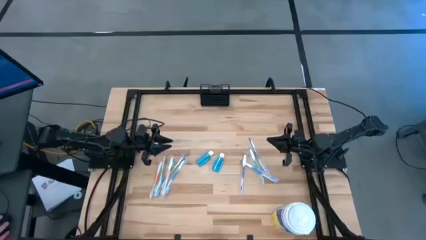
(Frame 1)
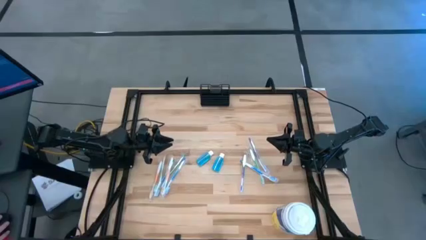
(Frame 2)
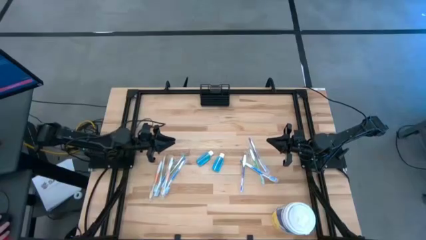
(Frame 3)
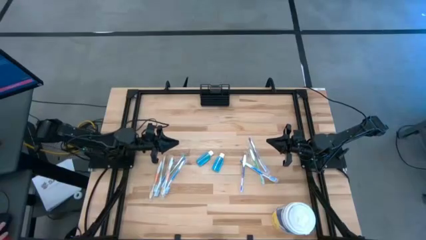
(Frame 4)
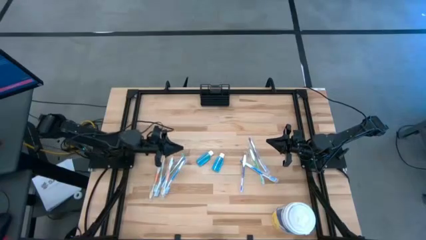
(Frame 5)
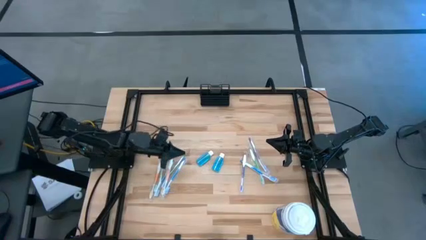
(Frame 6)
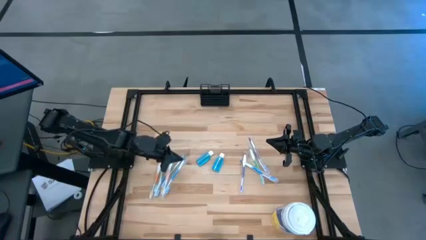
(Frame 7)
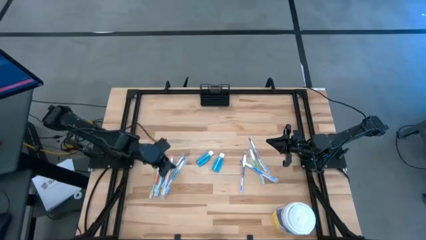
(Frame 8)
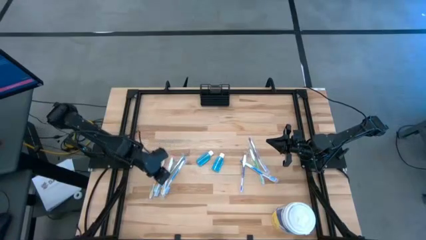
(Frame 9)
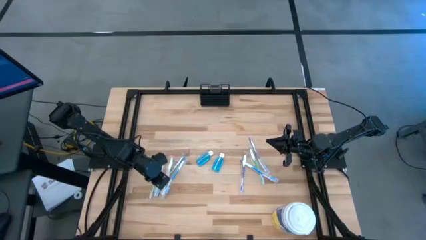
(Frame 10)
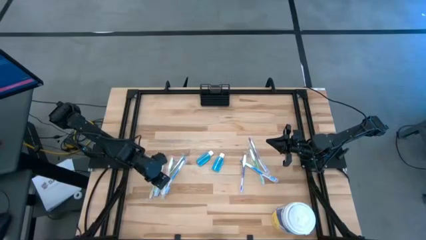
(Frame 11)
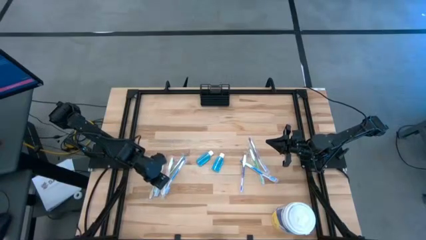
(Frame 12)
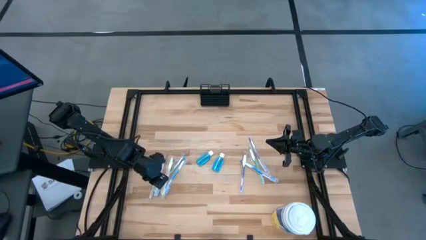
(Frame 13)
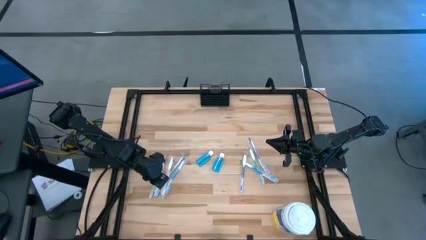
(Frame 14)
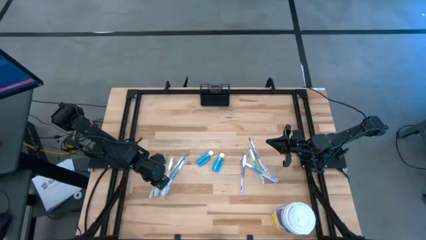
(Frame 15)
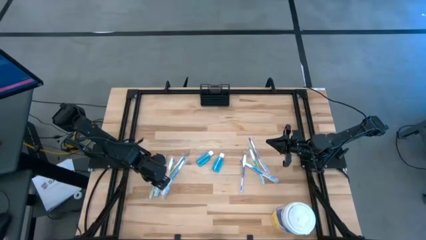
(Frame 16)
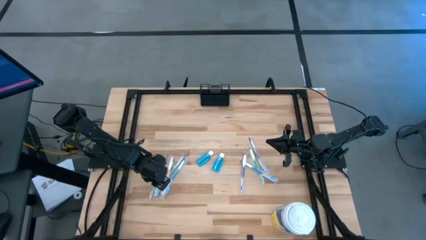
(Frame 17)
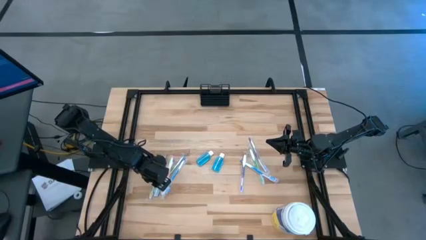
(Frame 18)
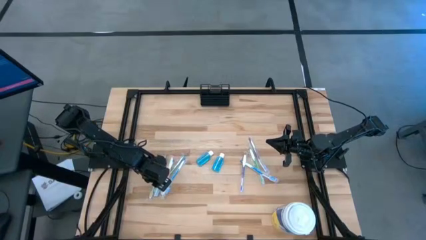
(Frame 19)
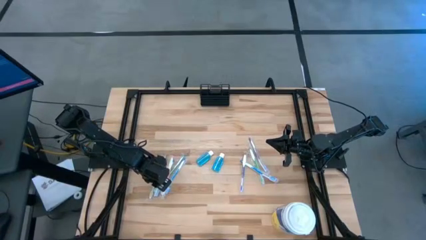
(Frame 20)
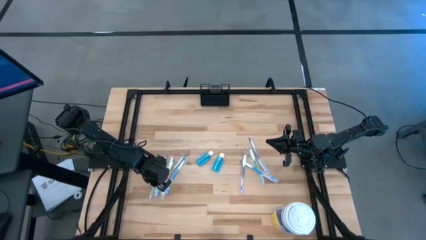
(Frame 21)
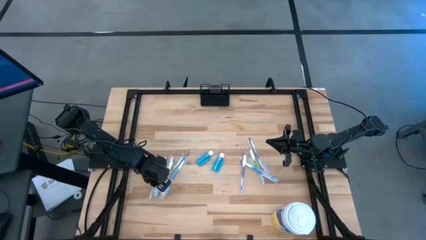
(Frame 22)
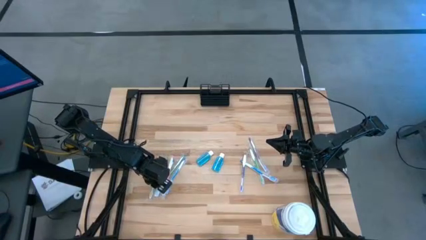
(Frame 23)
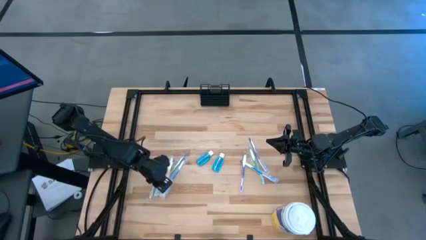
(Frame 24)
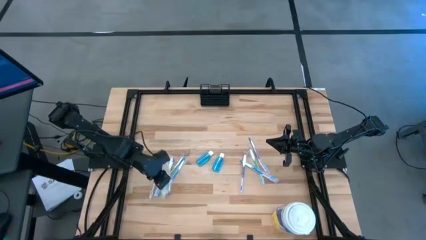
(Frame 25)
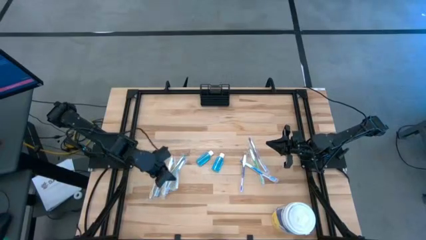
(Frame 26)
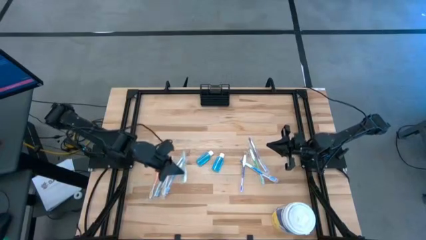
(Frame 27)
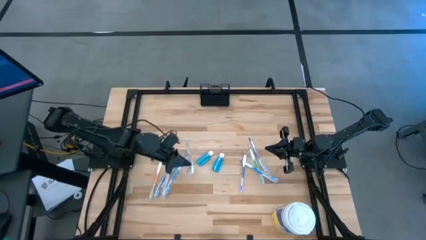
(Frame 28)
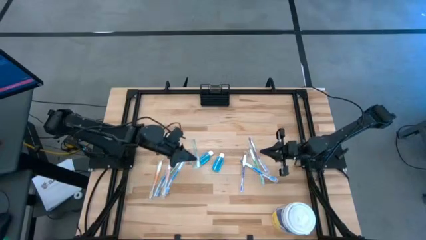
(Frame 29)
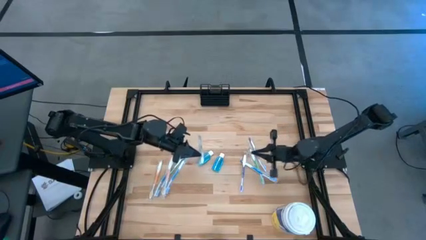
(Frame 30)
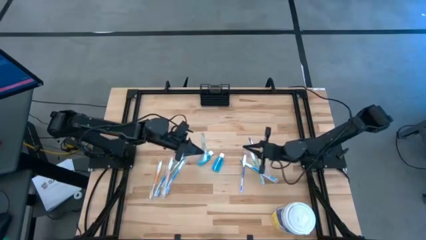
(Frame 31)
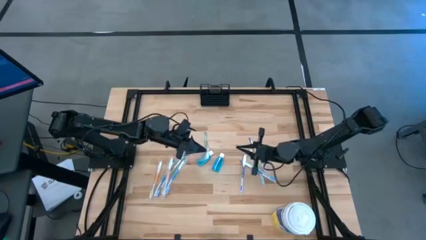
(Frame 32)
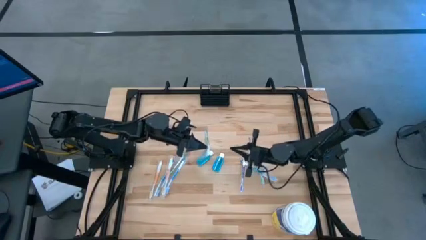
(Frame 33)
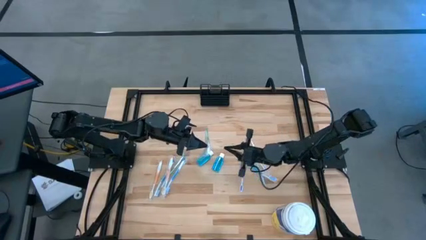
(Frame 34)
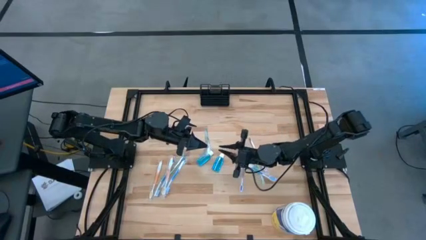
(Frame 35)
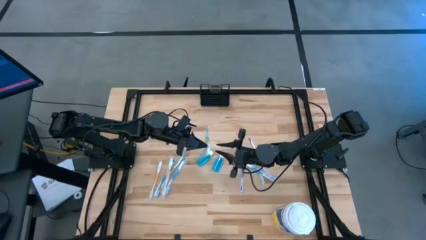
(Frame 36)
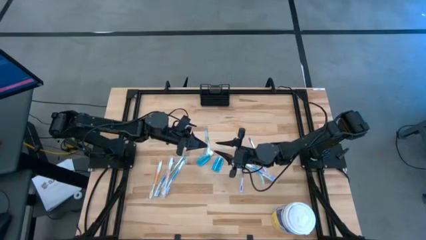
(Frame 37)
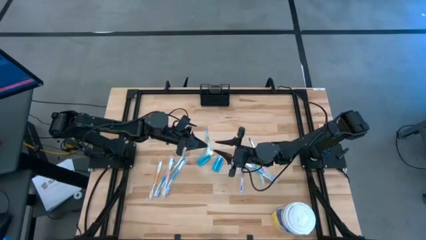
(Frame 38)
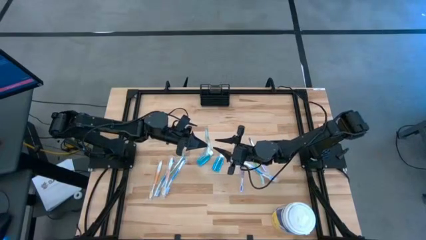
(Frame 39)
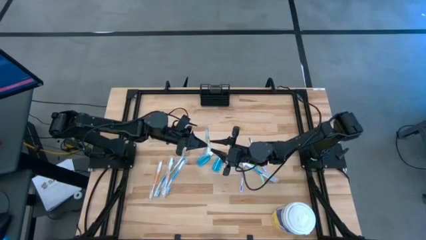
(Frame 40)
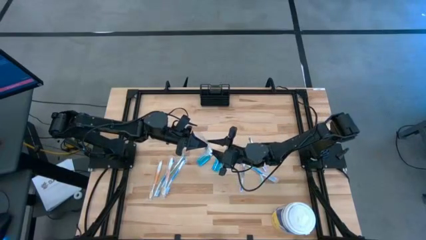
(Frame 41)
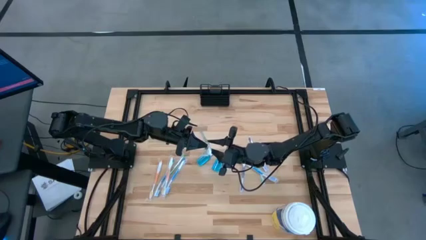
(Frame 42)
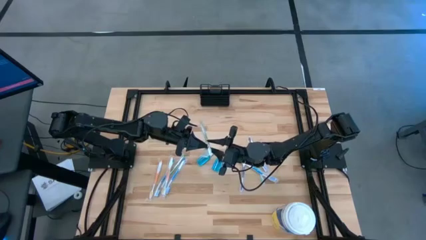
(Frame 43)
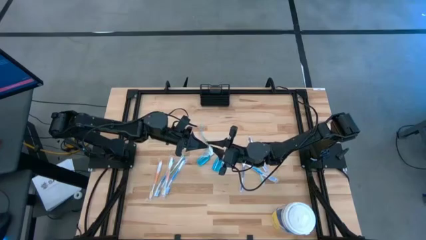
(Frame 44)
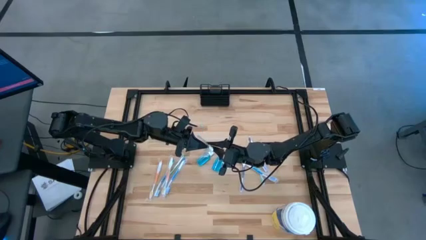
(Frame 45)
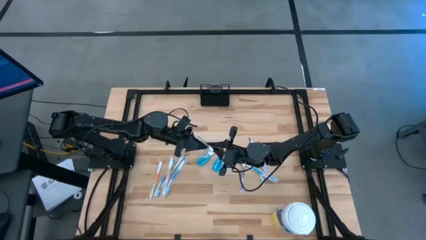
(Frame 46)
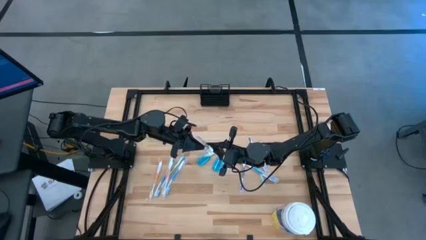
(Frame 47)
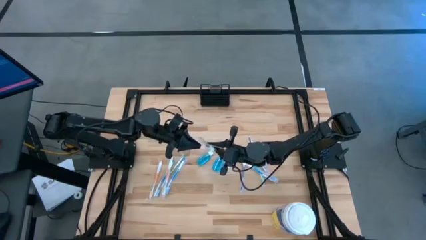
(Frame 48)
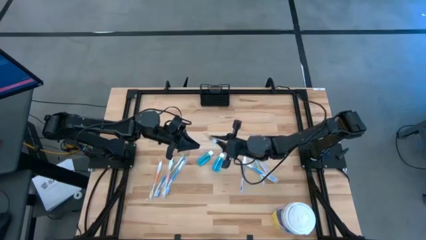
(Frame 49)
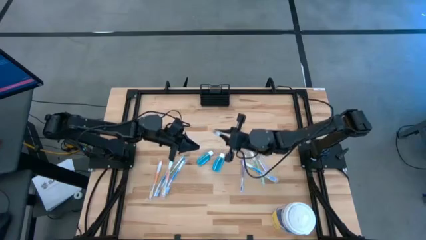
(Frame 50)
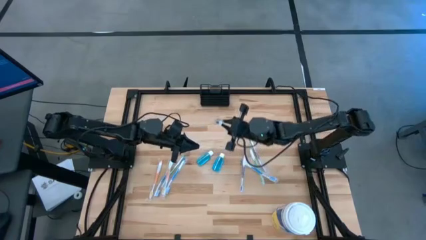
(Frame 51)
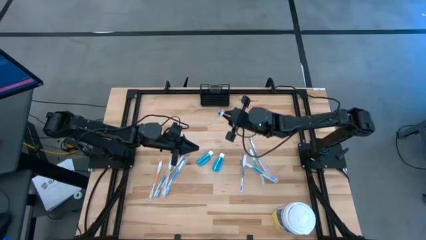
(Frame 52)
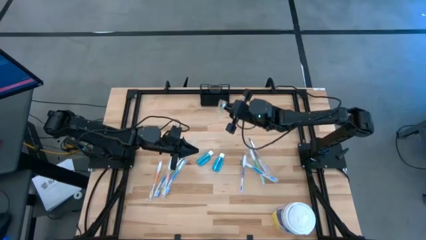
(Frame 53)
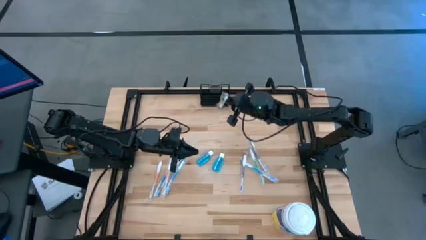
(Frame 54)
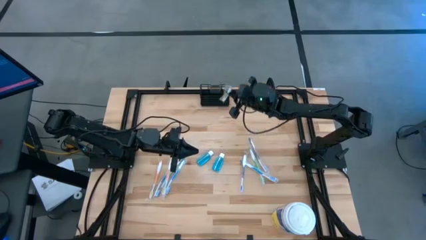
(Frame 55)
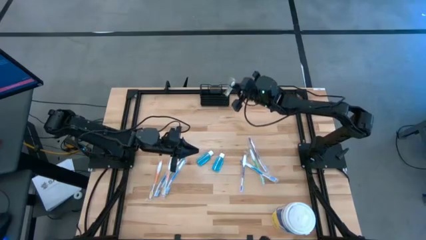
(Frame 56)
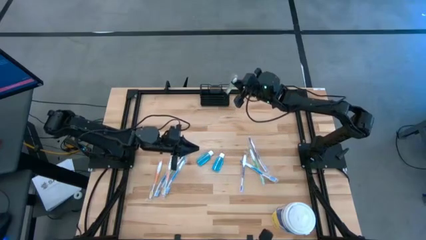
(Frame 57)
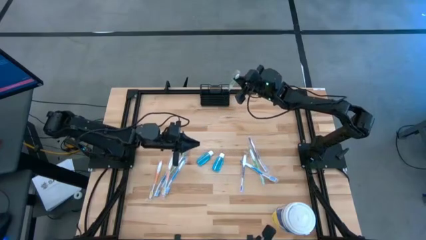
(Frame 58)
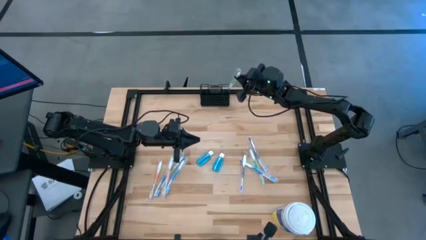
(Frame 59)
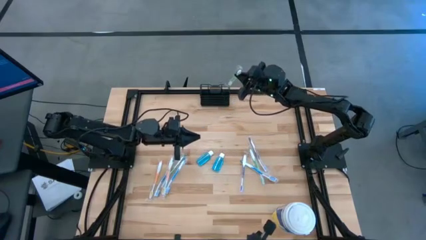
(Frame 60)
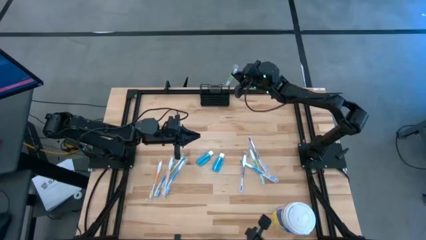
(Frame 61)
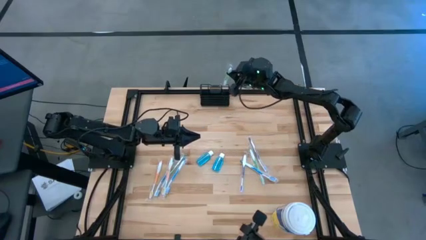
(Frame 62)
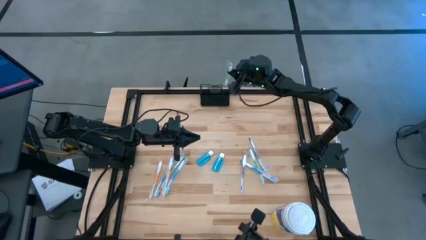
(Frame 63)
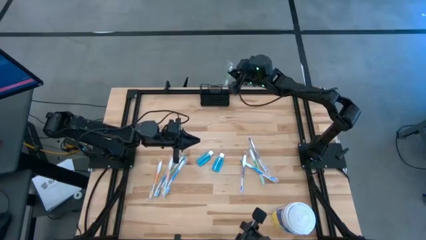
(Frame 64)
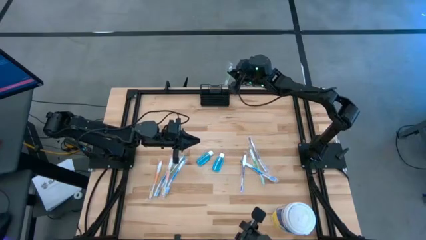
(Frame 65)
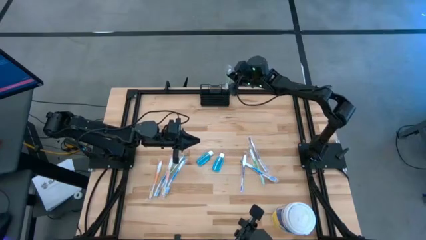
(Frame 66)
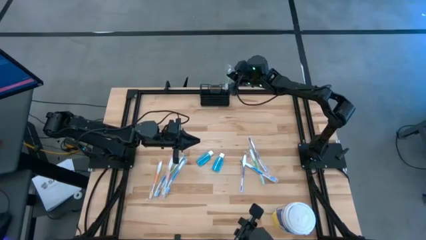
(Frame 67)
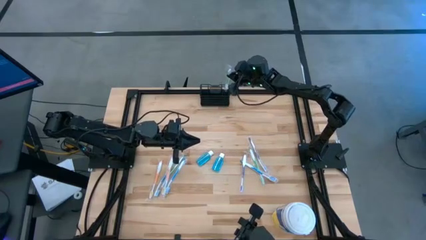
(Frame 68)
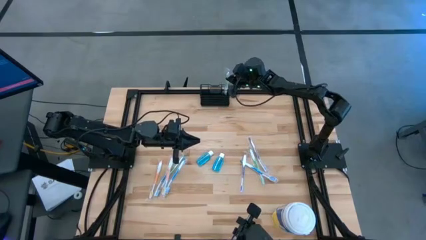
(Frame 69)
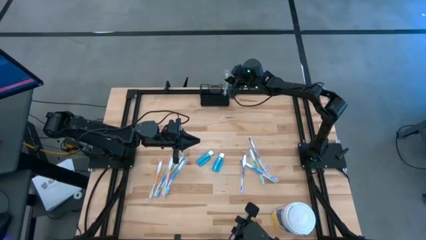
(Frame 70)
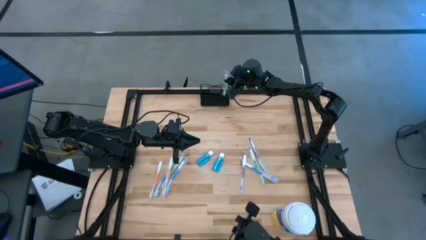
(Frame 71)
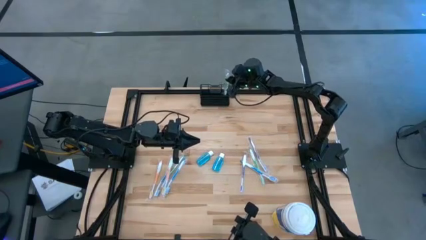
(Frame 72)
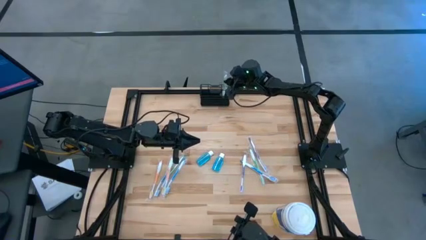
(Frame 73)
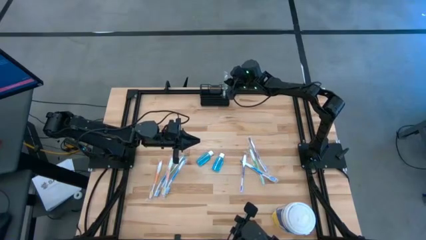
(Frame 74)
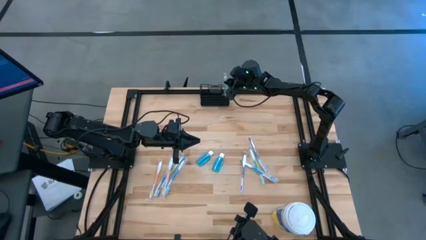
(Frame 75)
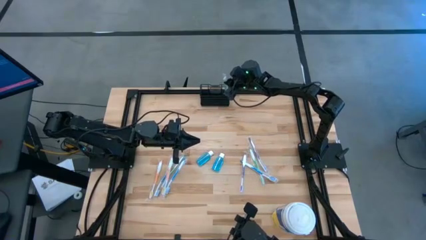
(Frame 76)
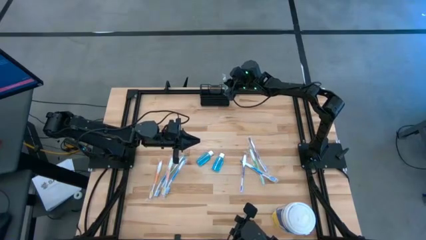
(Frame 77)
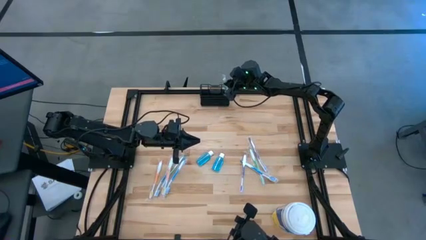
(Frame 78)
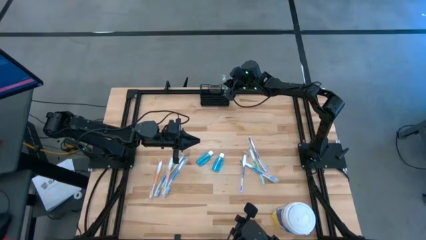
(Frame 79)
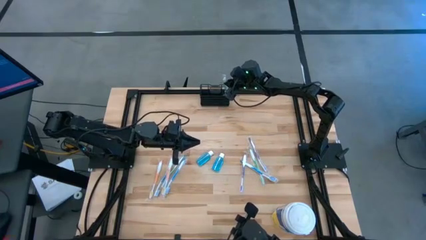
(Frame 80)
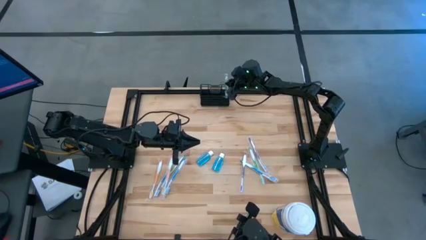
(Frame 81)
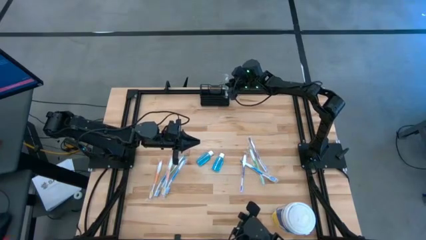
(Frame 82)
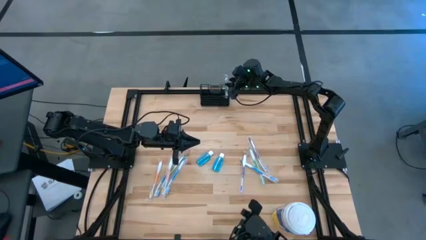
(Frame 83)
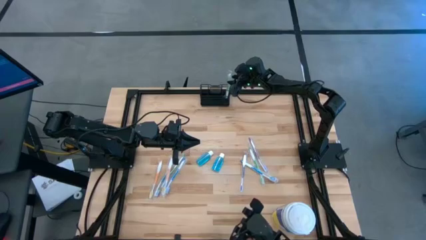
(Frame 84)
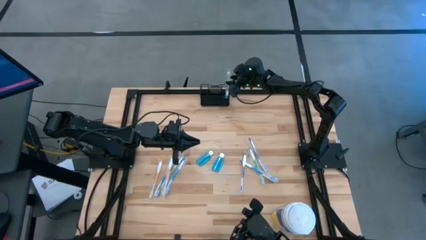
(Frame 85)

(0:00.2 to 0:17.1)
Task: Pick & Place toothbrushing station
Put the left green toothbrush into the black wire organizer
